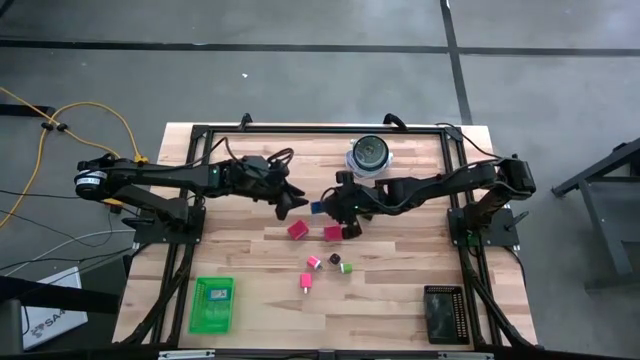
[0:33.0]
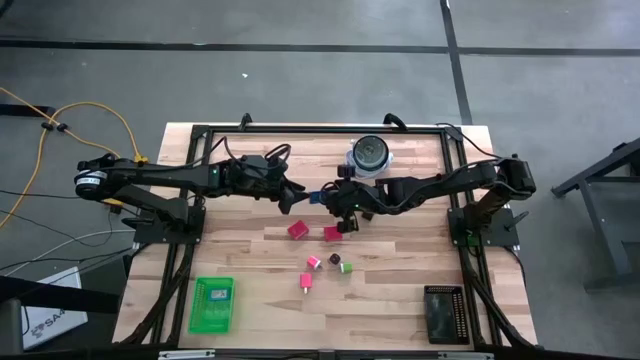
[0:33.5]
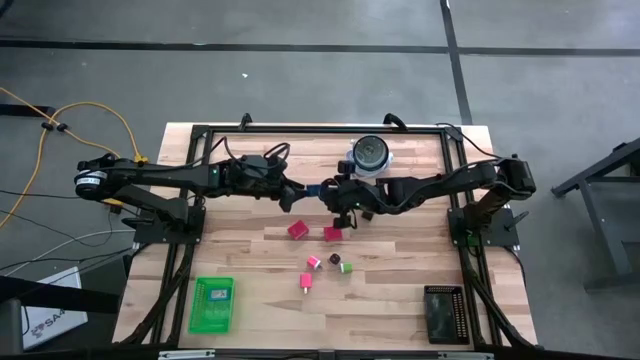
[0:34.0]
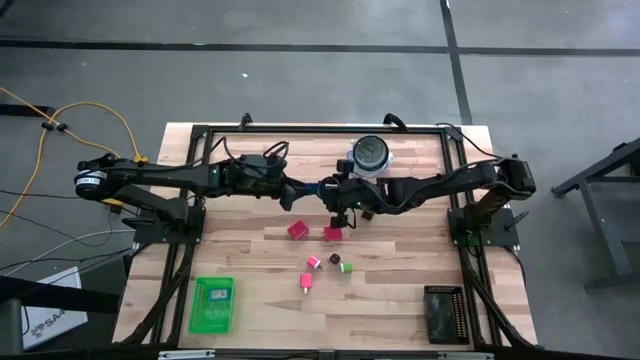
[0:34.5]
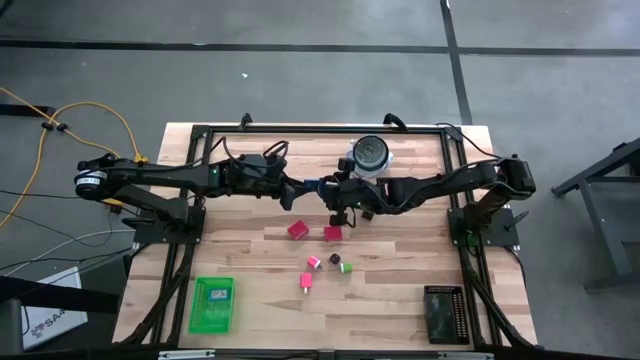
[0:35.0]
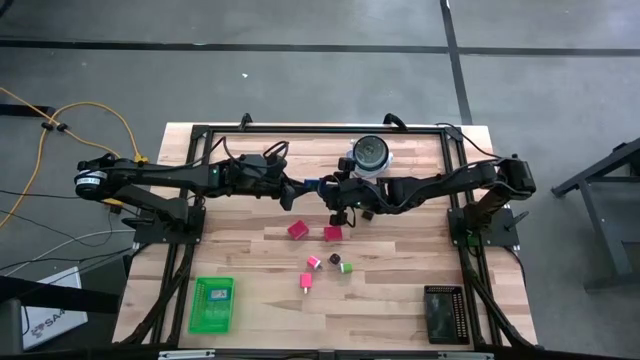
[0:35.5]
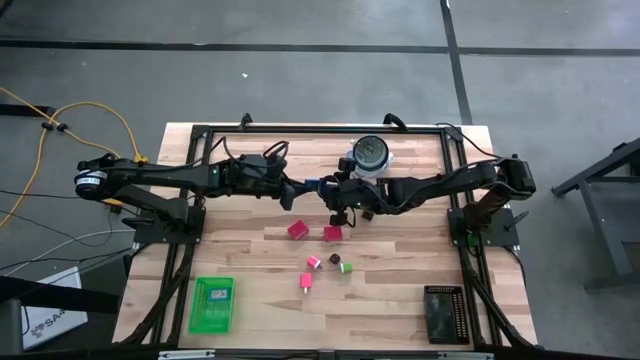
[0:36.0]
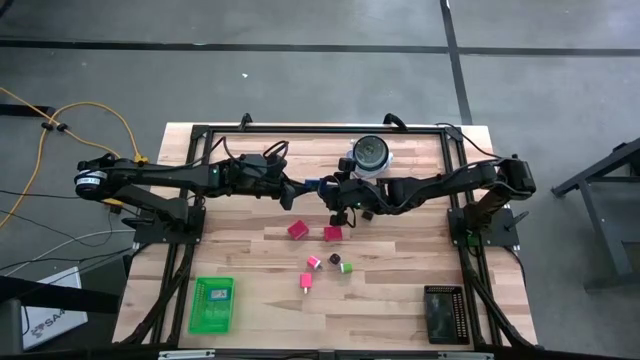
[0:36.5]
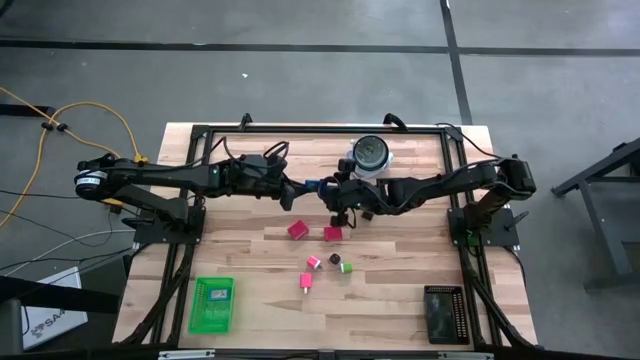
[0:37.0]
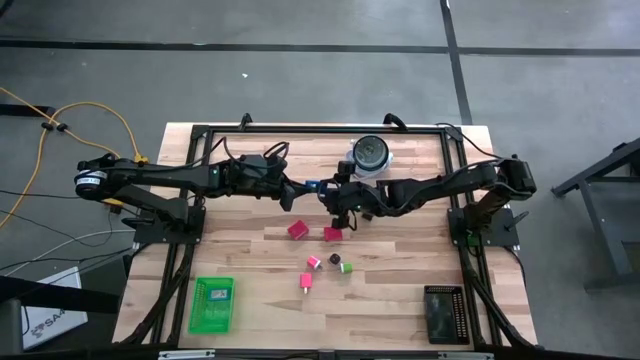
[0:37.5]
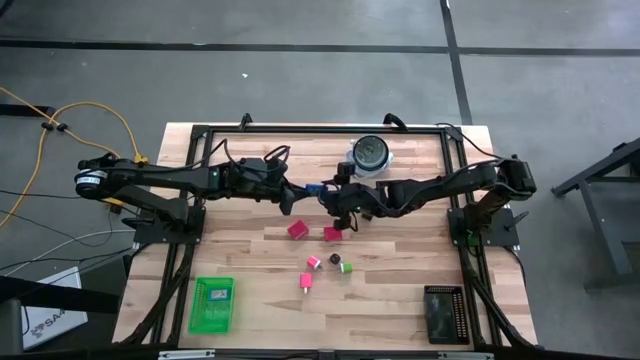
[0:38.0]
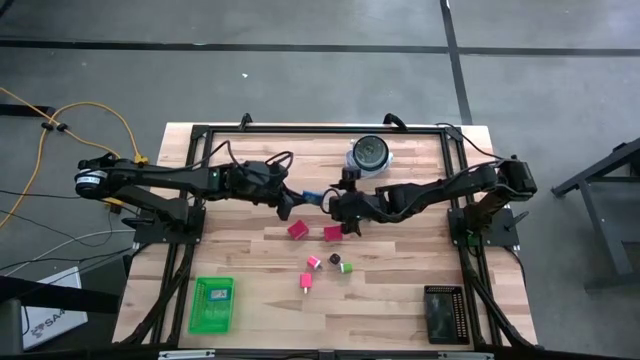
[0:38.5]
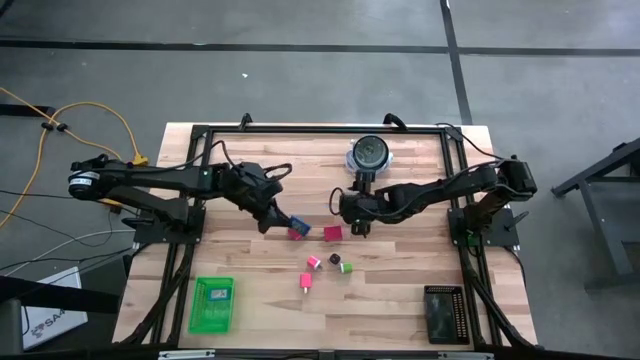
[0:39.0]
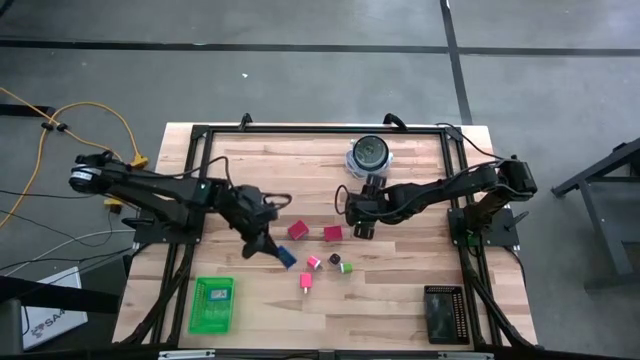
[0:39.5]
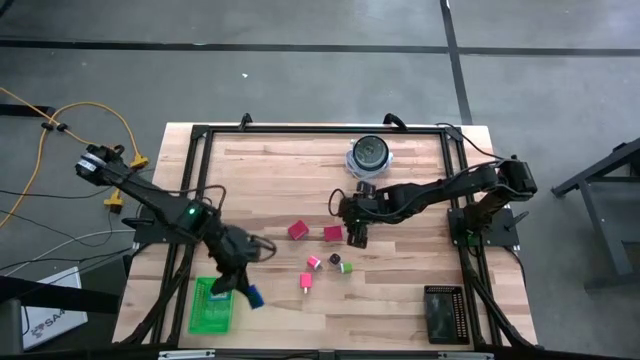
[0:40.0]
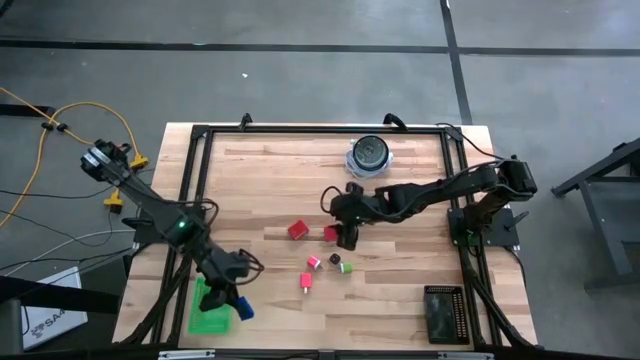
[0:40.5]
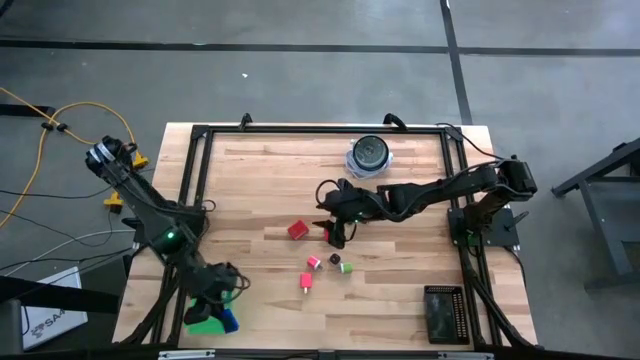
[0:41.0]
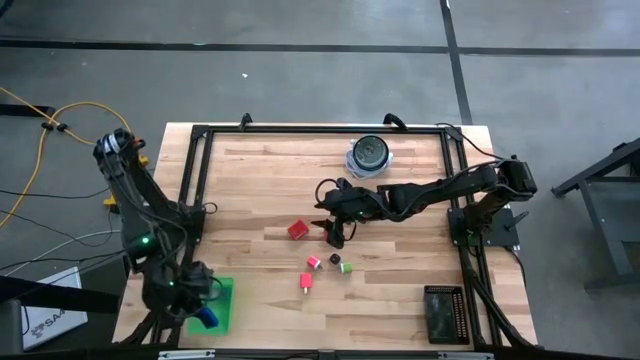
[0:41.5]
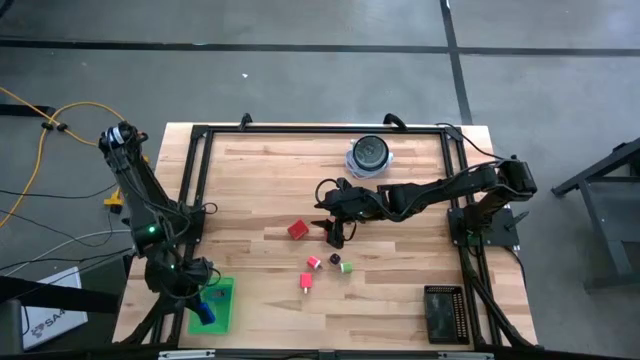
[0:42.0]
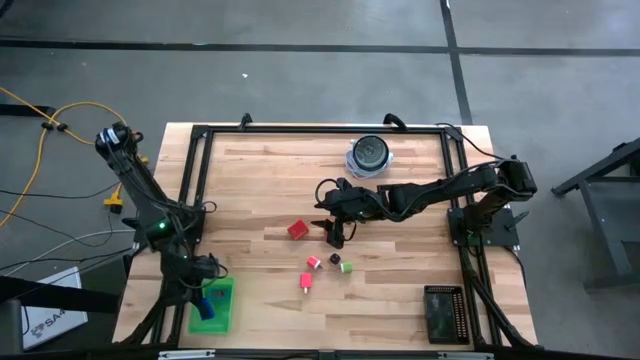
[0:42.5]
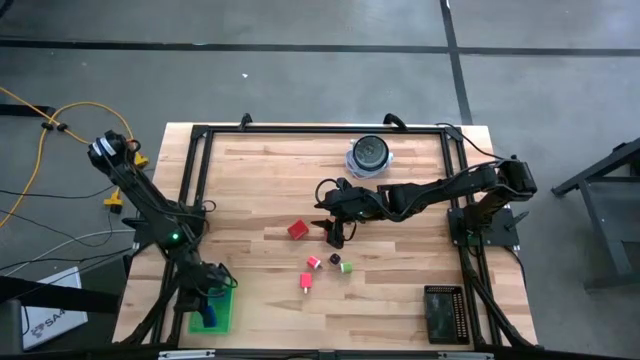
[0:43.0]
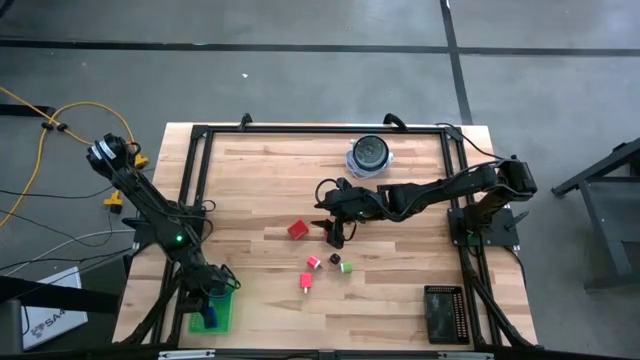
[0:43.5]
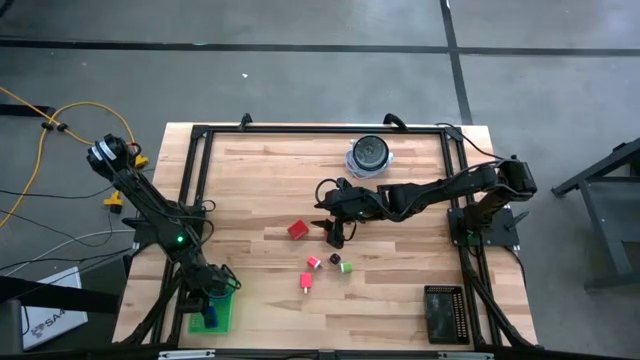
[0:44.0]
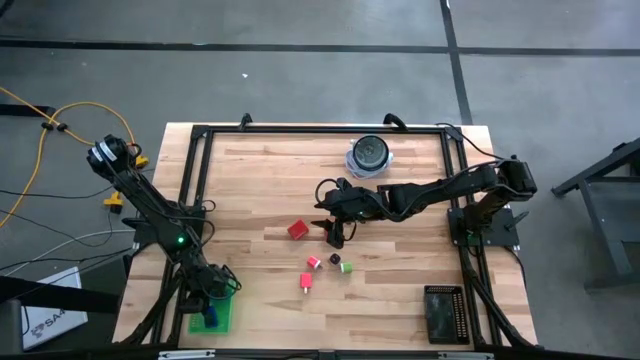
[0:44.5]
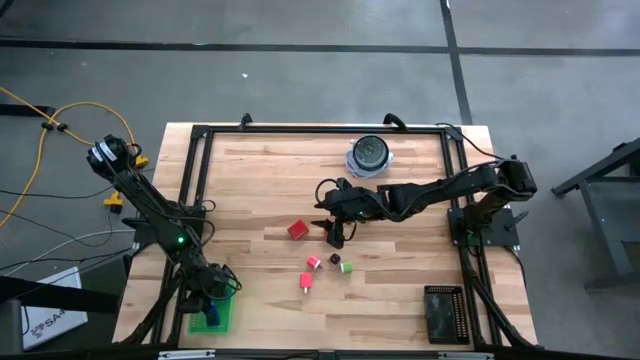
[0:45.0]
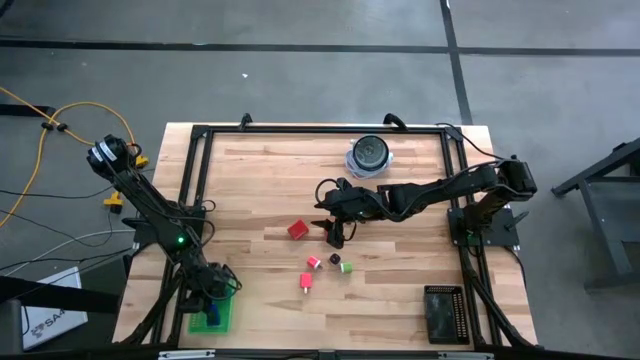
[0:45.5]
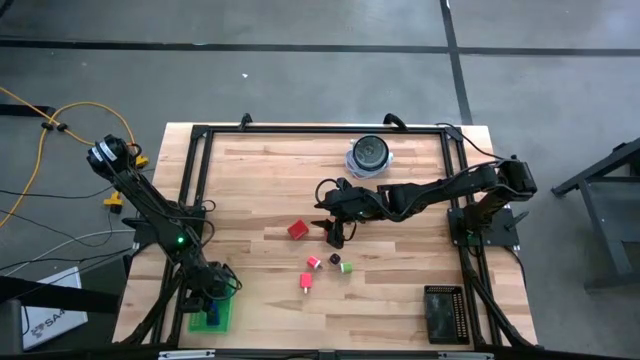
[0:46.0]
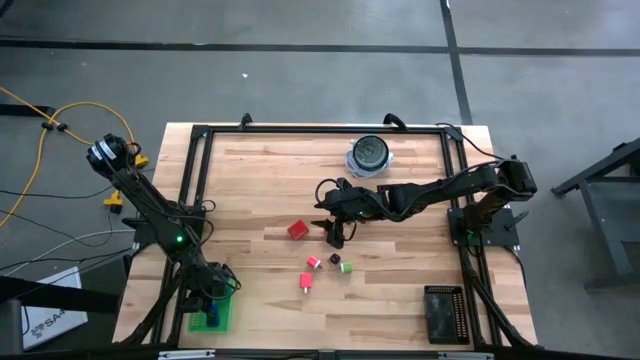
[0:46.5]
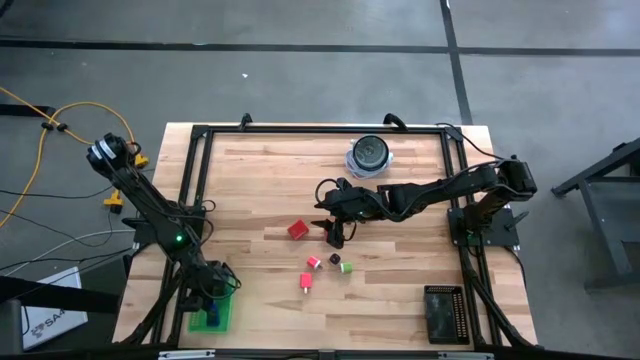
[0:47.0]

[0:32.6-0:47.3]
Task: Pick & Place Office items
Put the blue digital timer into the green bin

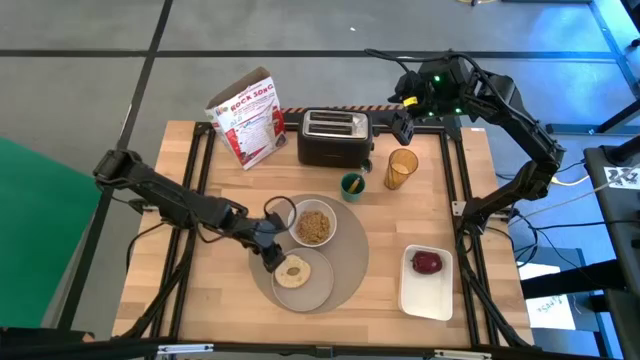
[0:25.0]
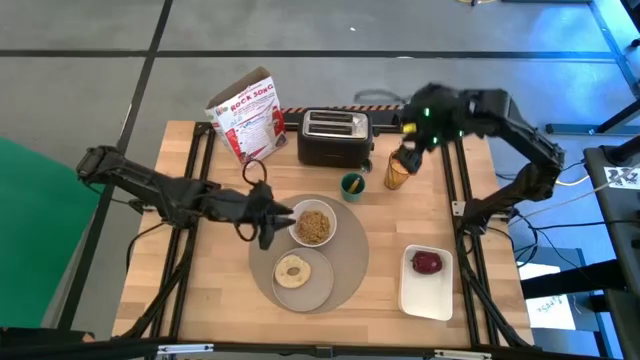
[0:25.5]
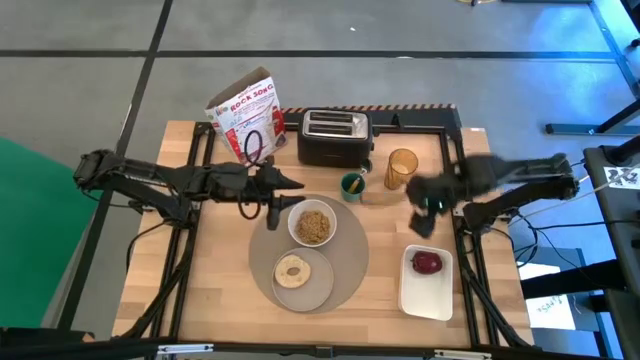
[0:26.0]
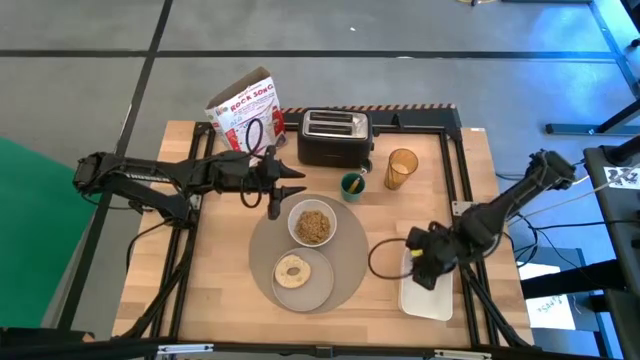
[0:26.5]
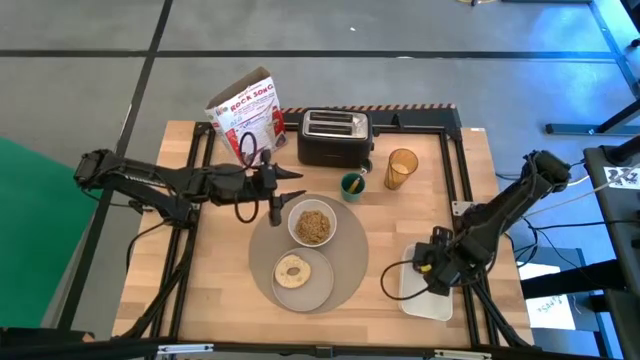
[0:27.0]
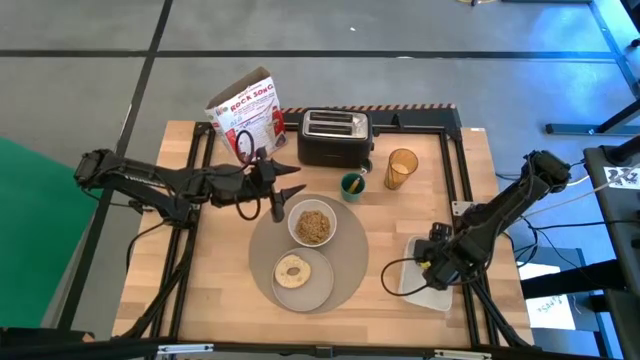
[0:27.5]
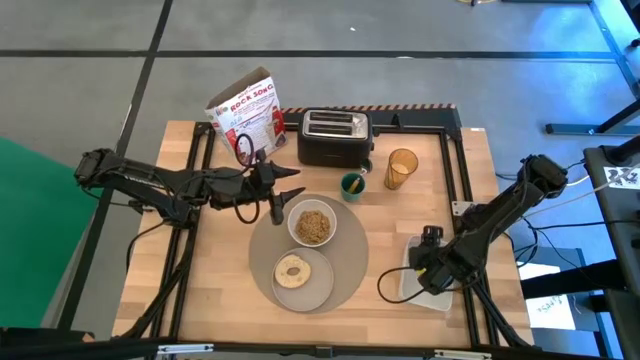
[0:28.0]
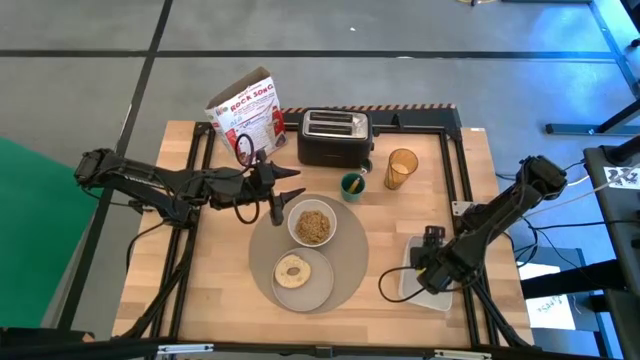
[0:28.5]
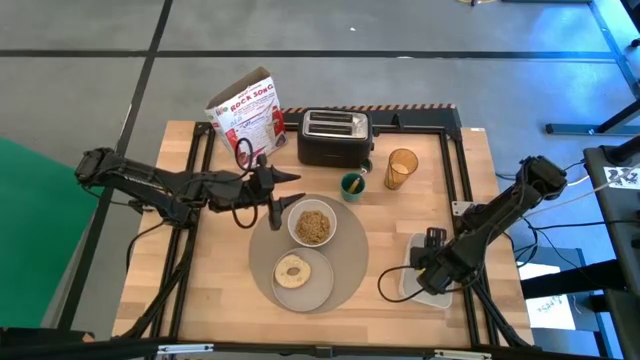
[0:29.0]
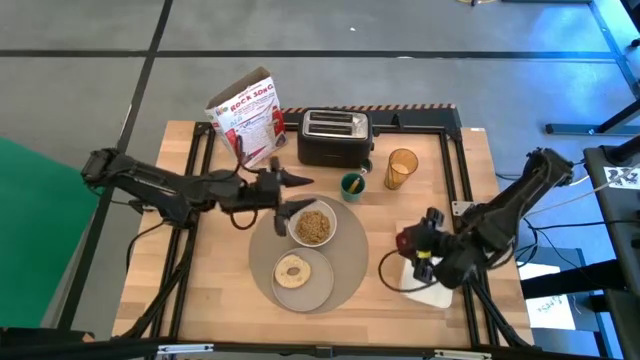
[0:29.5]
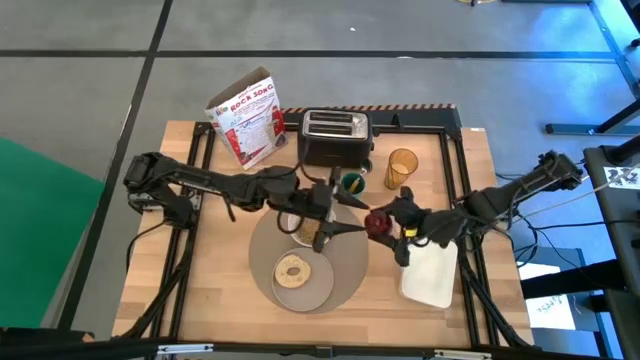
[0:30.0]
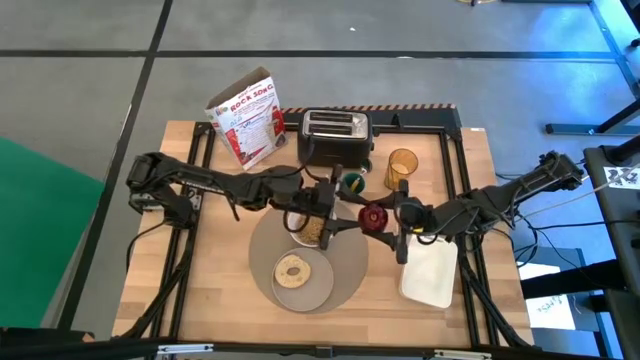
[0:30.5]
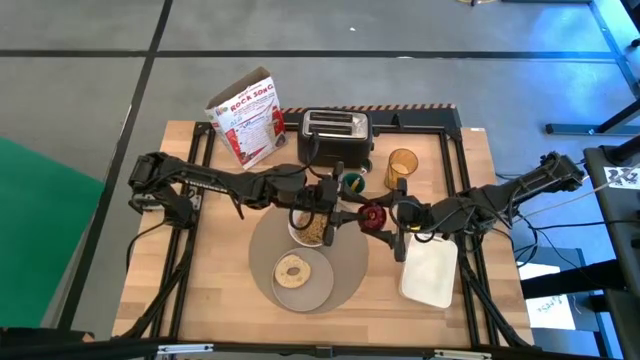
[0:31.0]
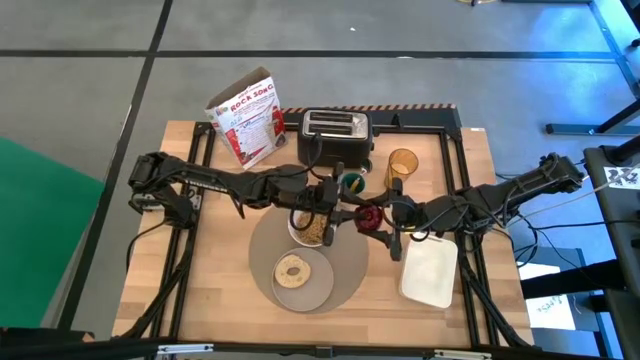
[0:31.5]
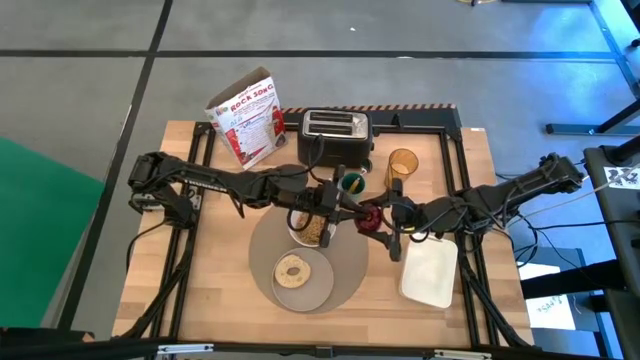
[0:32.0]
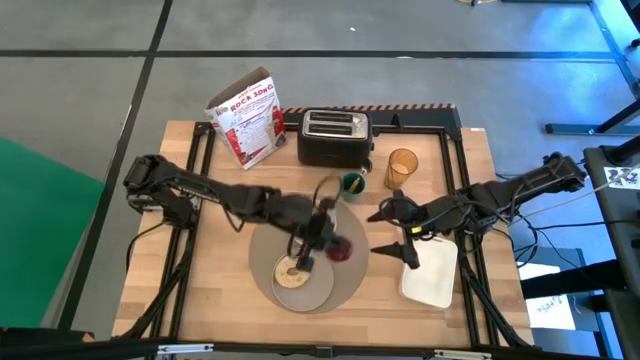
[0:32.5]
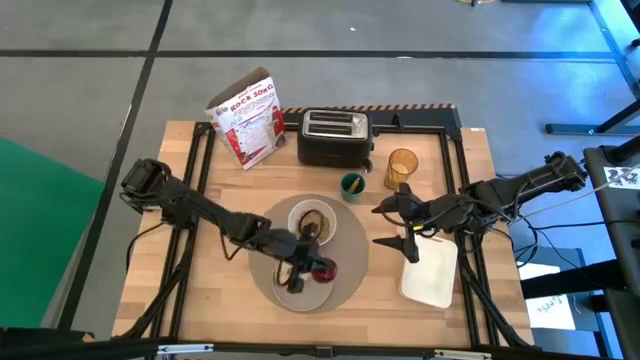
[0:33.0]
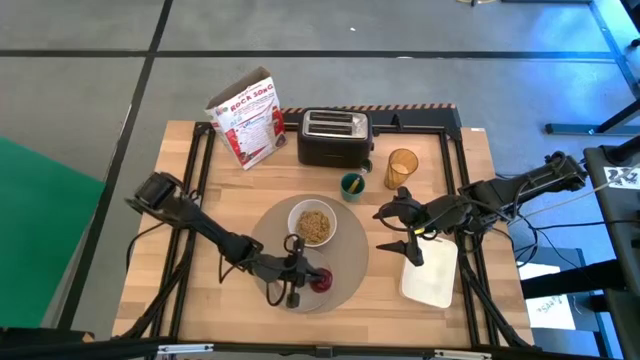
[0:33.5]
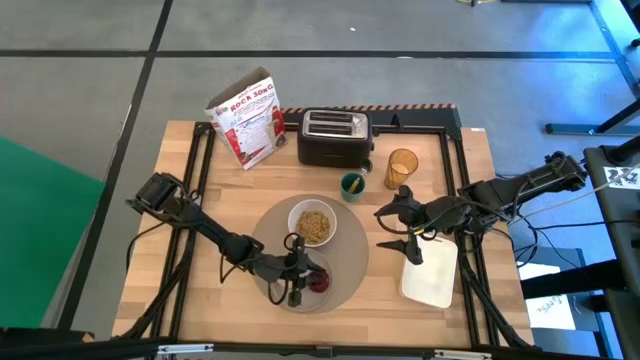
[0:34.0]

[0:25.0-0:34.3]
Task: Arrange a breakfast setting
Put the apple from the white bin on the brown plate to the right of the toasted bread
